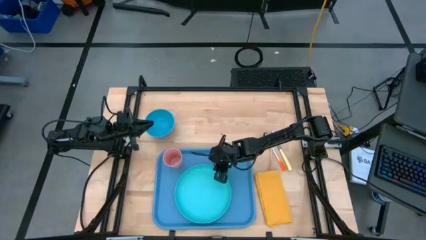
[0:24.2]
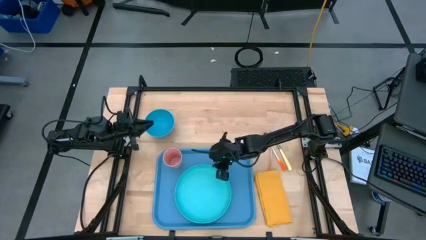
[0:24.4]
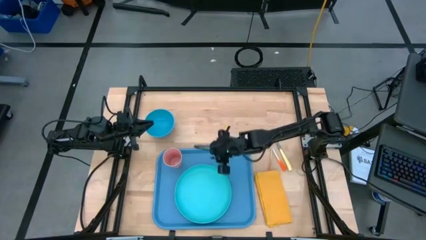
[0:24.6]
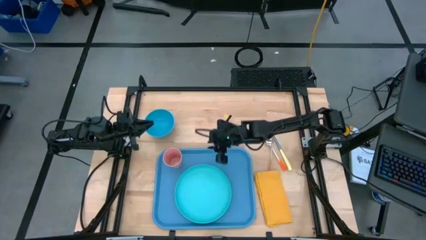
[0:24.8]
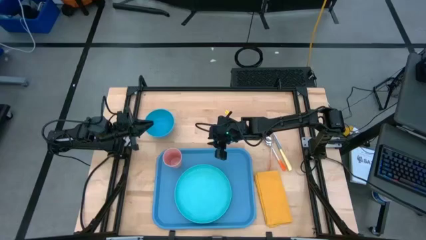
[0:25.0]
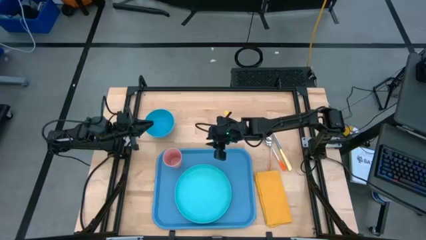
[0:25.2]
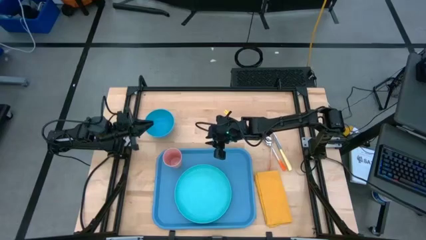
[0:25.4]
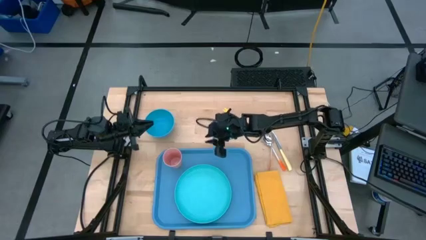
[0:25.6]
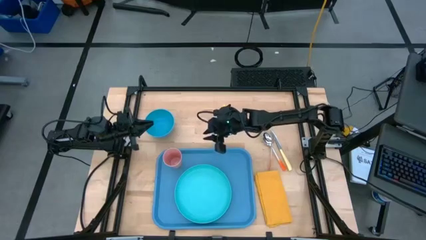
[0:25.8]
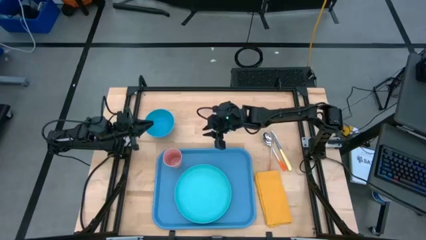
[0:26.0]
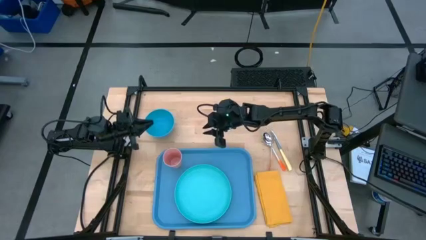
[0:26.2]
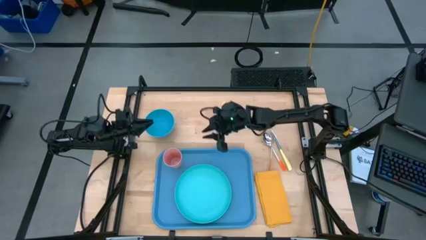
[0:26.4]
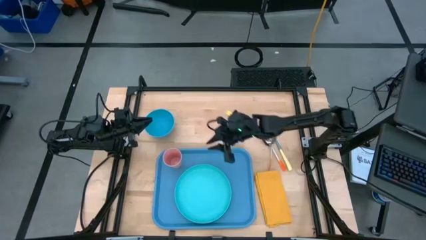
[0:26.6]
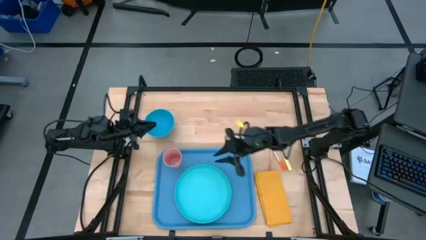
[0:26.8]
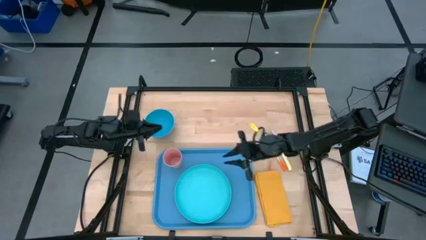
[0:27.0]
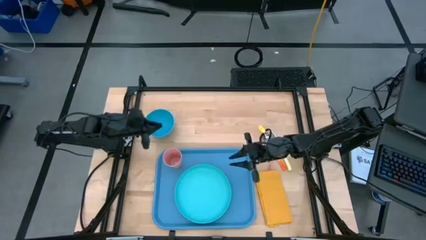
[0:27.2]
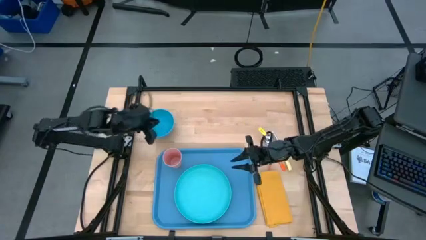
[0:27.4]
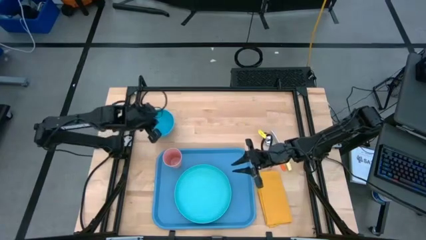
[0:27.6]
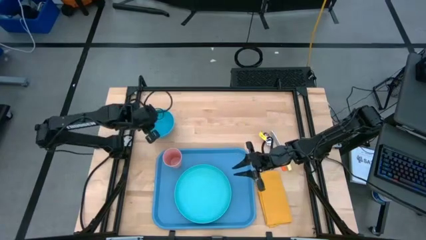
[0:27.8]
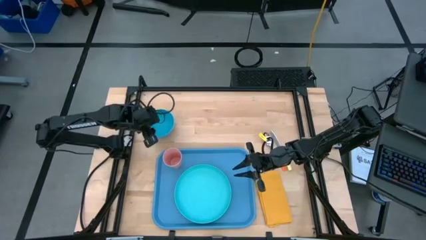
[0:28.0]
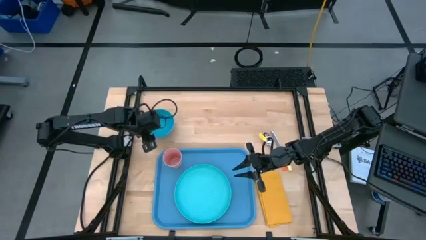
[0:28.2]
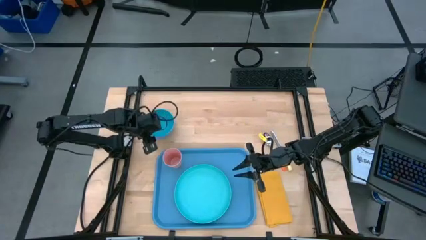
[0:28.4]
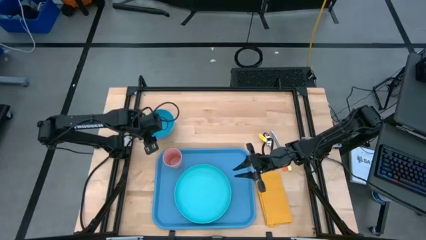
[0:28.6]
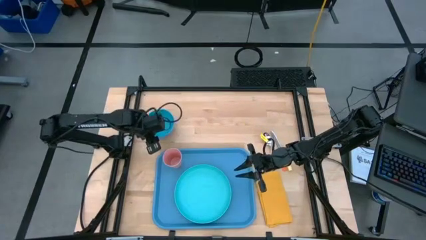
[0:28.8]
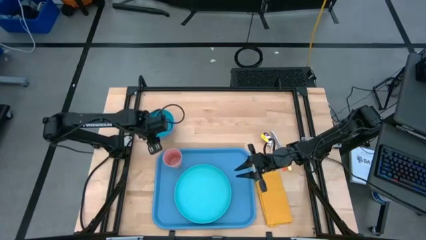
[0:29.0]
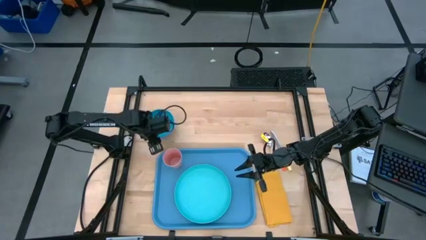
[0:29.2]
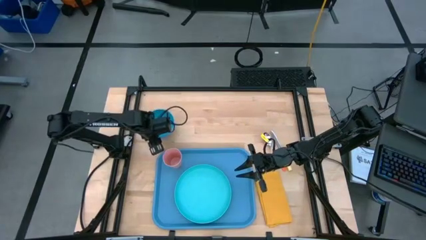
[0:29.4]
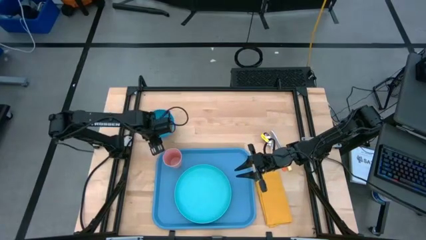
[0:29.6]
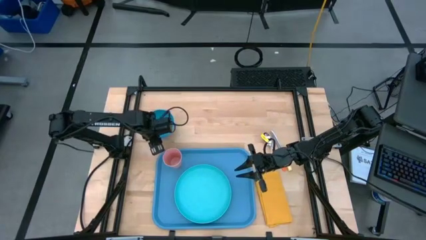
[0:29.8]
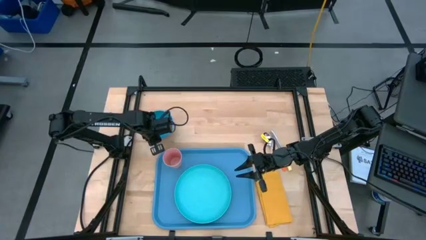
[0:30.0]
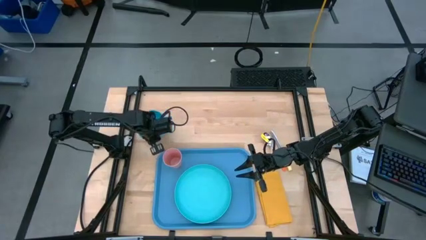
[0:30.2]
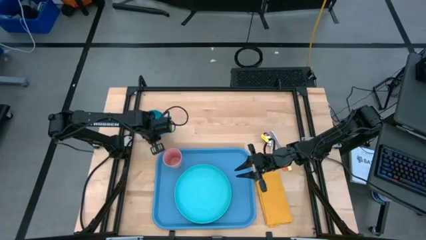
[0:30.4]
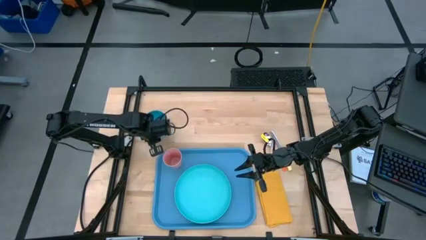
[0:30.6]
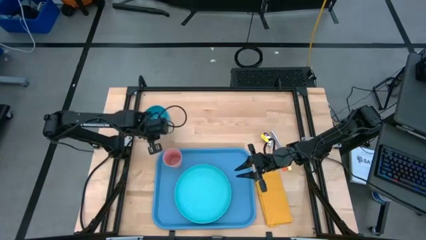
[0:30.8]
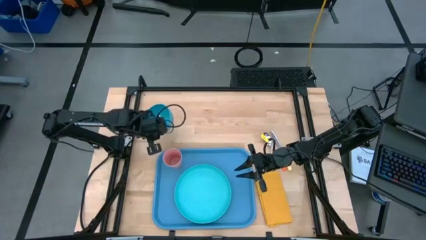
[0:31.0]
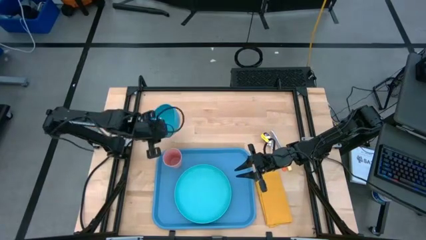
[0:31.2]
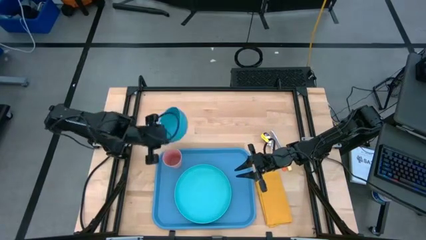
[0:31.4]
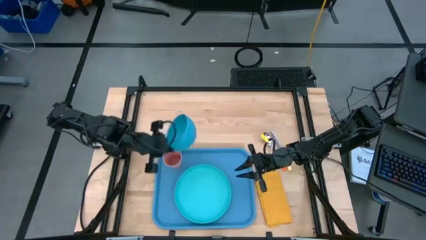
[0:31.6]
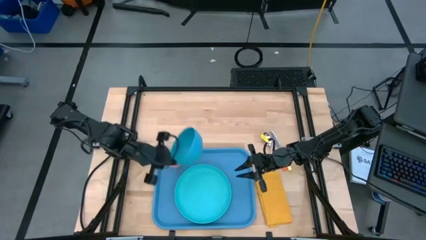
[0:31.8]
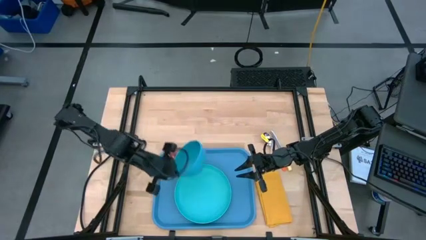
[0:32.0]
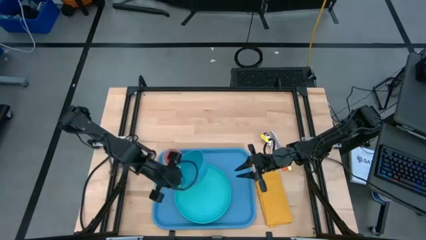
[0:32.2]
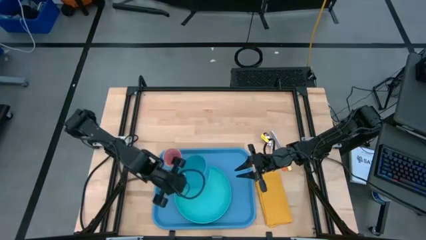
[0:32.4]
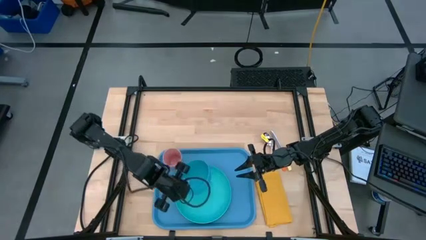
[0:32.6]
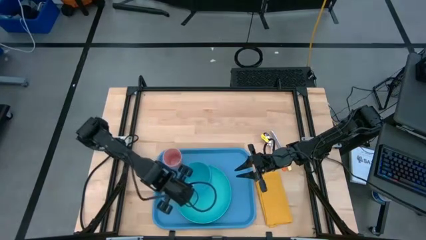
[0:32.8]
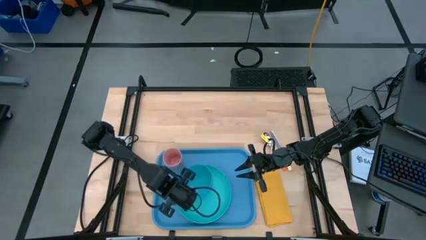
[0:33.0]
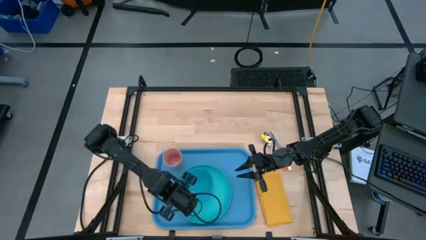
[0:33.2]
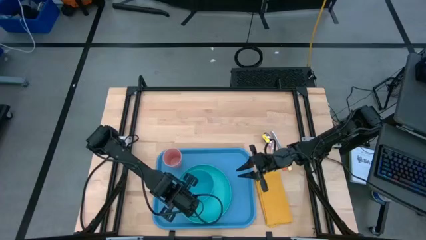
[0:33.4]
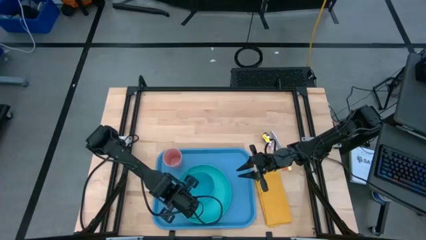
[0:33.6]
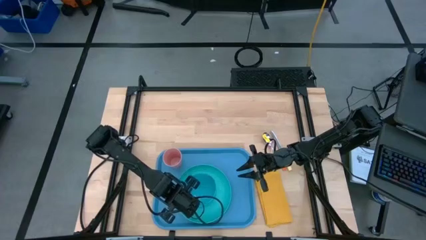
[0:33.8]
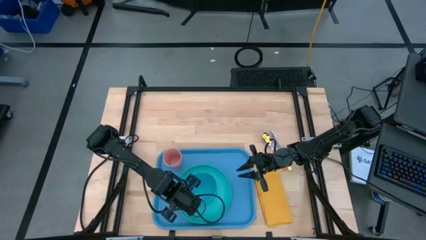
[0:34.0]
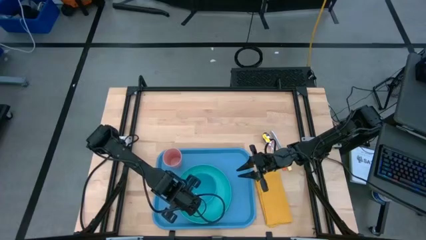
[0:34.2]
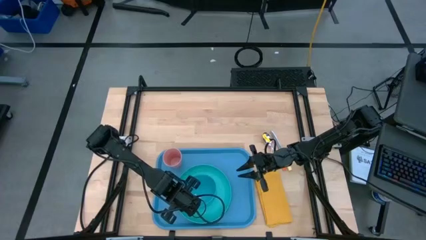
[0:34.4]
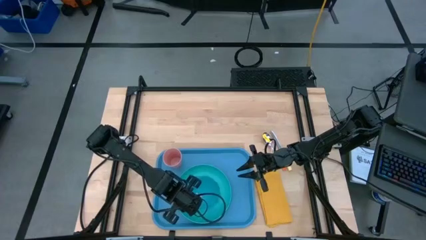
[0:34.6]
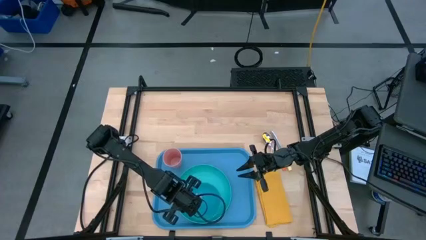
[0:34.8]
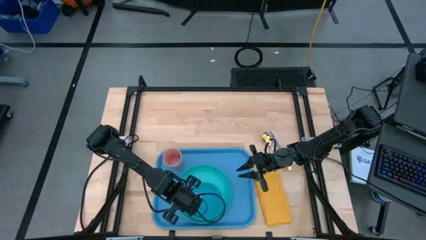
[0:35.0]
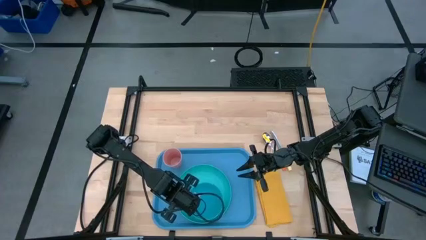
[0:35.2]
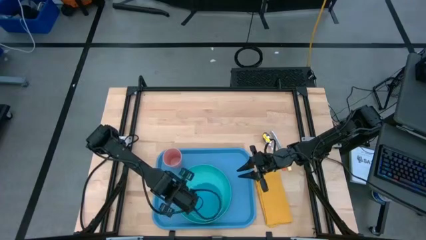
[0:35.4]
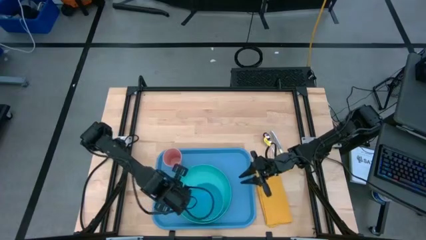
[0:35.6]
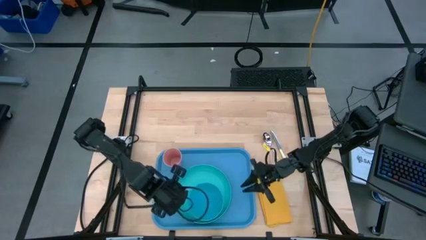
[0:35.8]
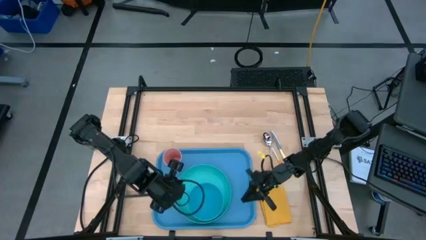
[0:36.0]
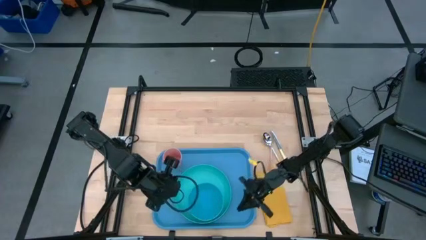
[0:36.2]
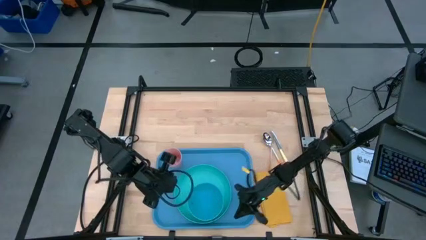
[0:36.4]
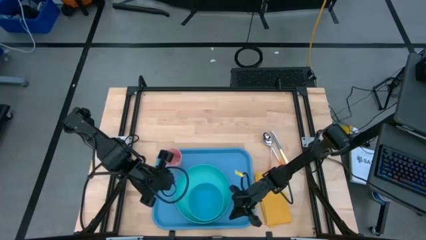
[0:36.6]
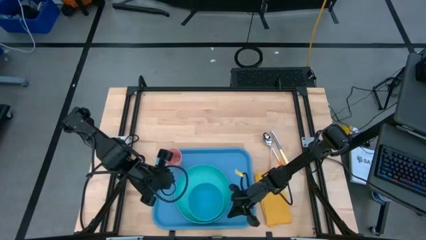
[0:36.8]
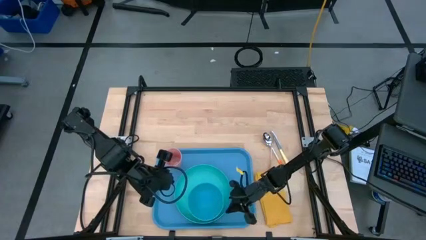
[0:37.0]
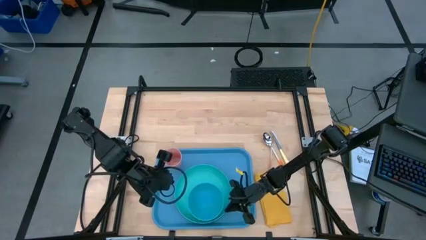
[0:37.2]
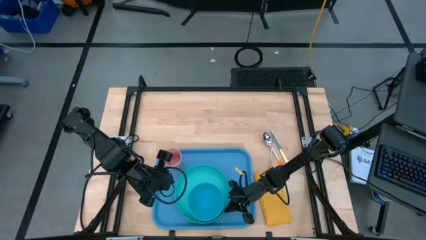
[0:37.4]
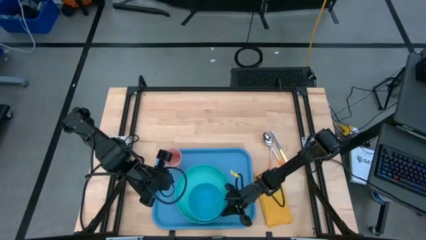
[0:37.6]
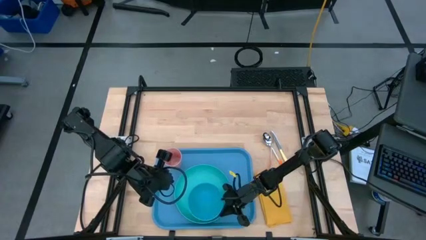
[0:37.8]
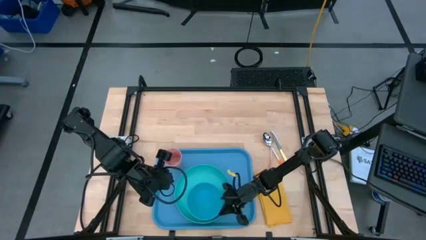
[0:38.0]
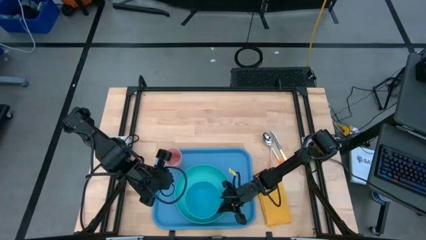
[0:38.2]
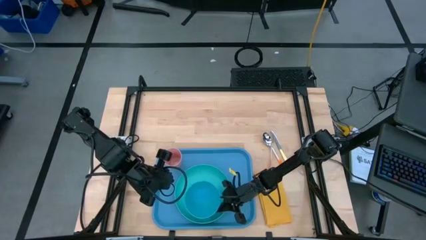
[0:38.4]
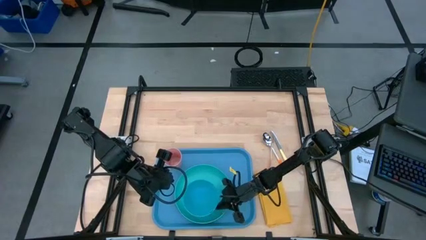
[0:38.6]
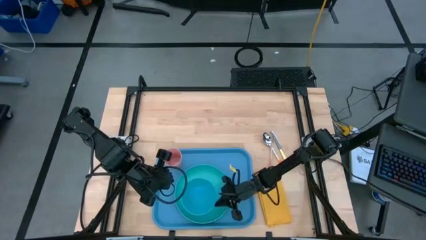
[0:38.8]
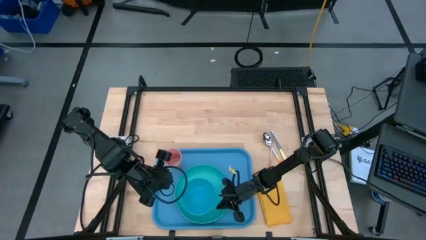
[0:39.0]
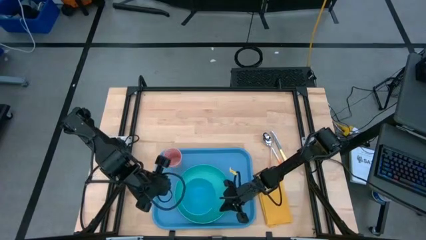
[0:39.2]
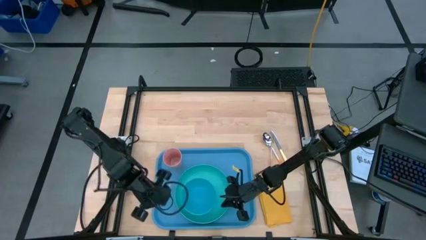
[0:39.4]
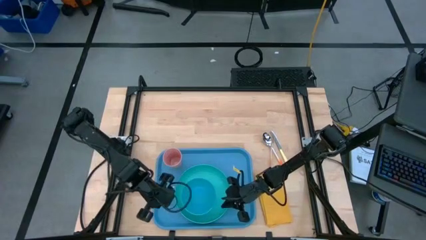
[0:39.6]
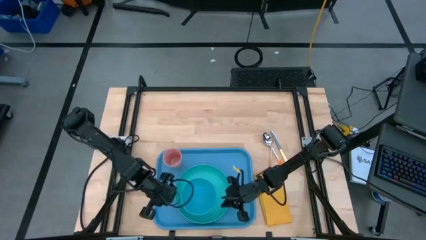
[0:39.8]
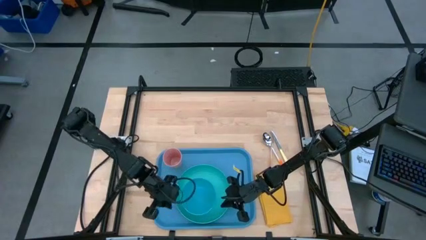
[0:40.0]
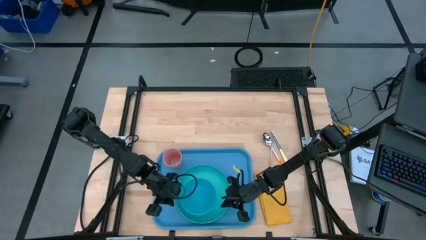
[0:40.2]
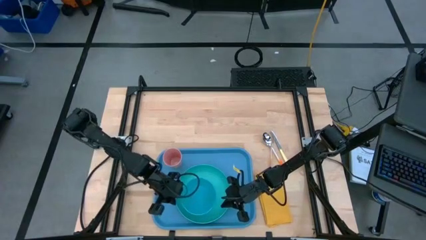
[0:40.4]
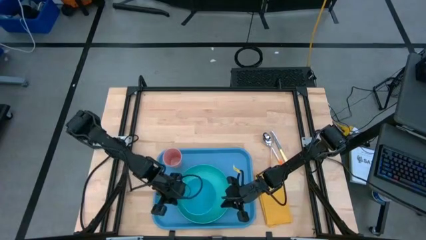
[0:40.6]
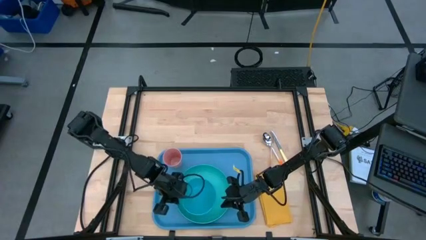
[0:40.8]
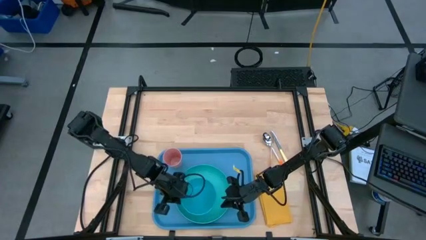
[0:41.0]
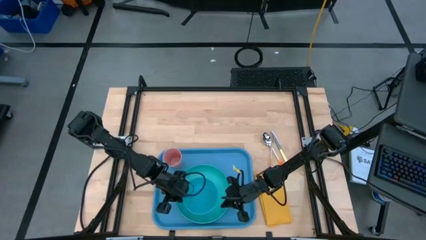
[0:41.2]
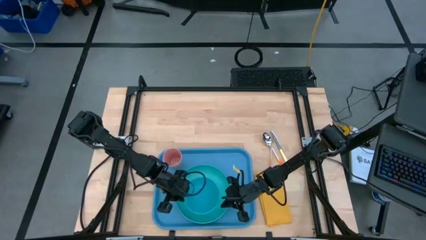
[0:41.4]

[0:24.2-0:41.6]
Task: Set up tray
Put the bowl on top of the plate

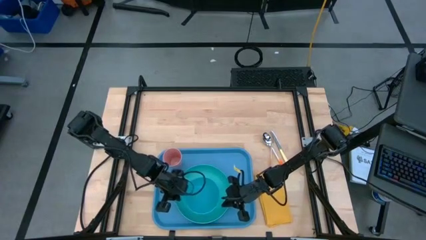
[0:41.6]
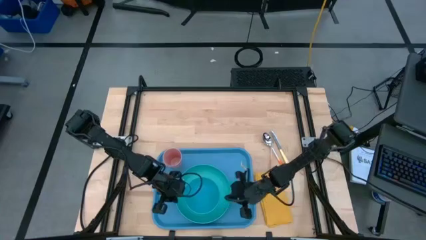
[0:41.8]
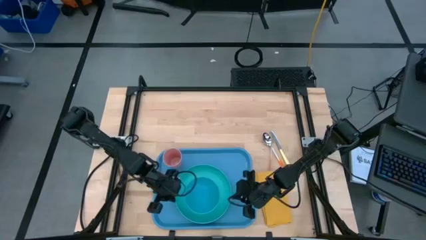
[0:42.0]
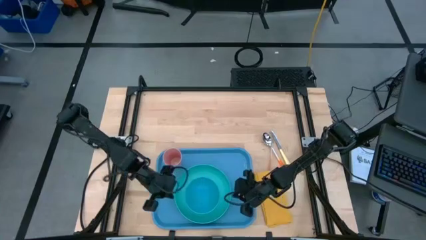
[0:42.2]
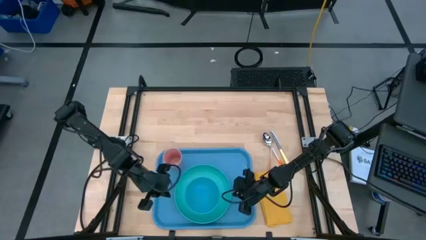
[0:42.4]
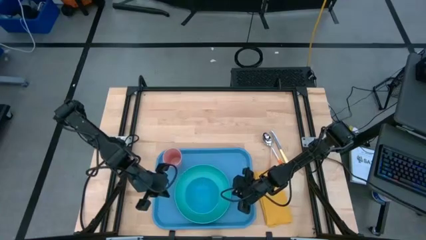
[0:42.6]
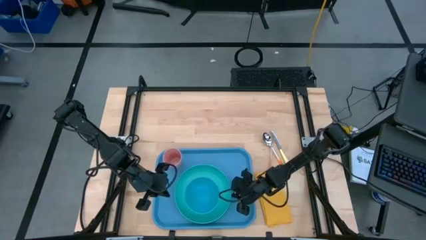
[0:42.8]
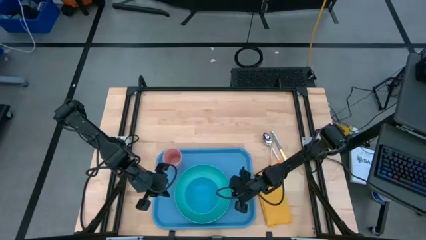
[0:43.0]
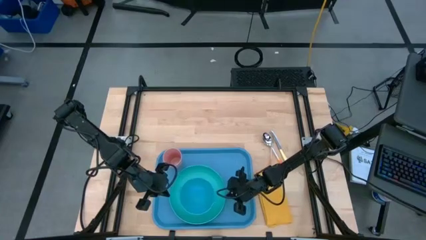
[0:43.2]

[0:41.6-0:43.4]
Adjust the plate on the serving tray
